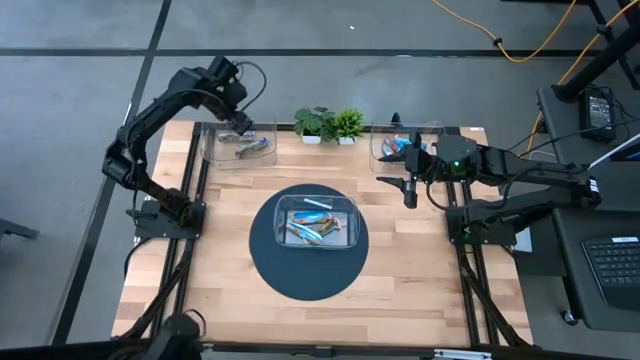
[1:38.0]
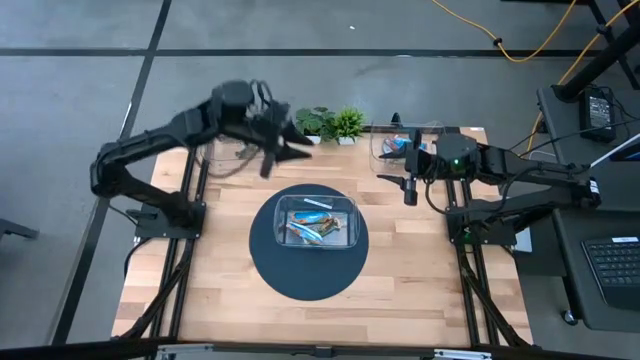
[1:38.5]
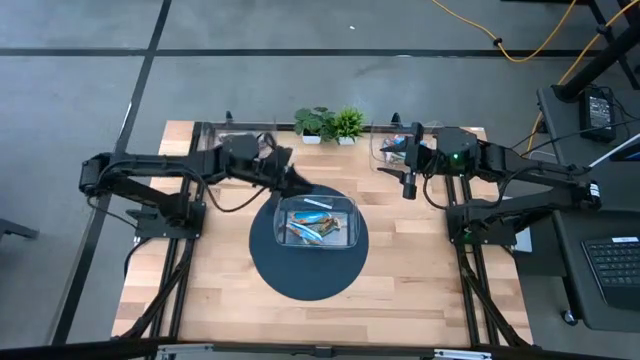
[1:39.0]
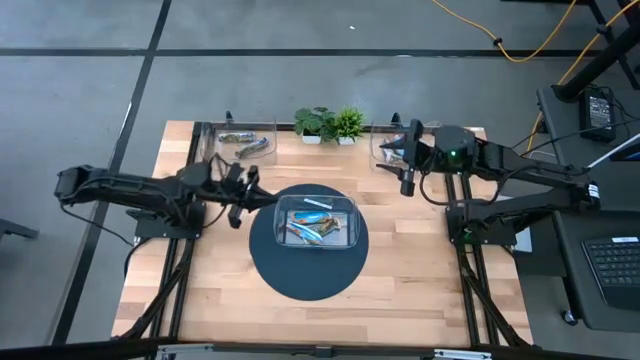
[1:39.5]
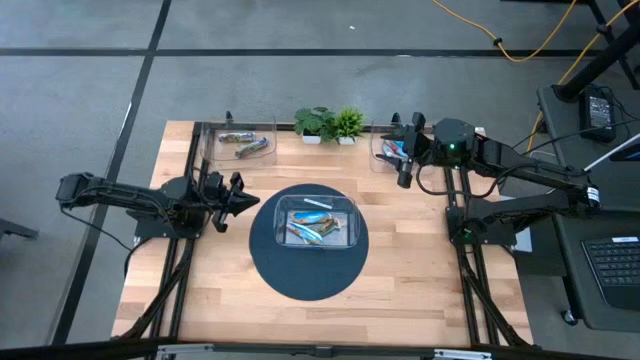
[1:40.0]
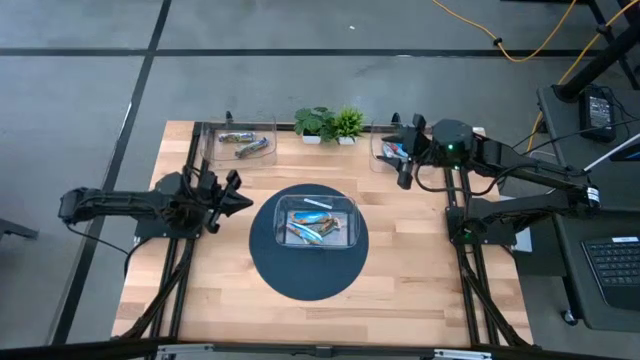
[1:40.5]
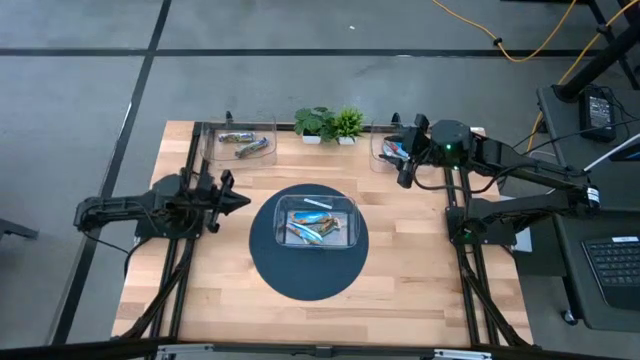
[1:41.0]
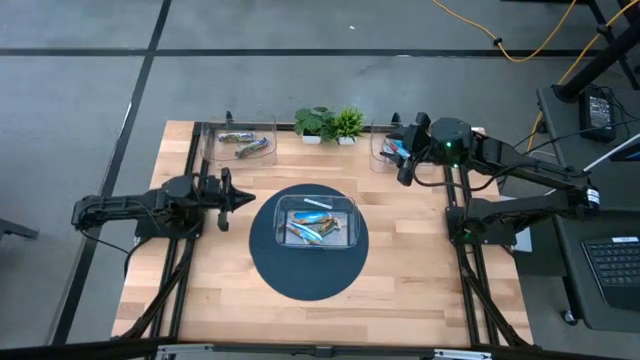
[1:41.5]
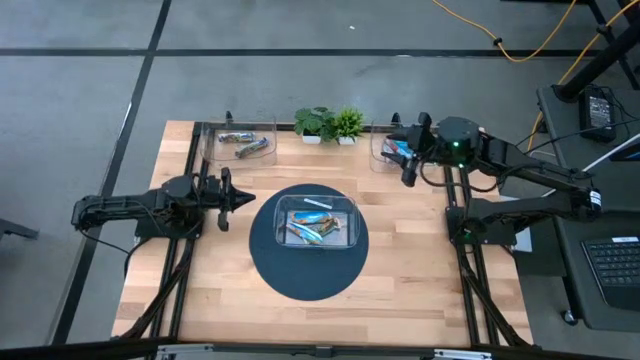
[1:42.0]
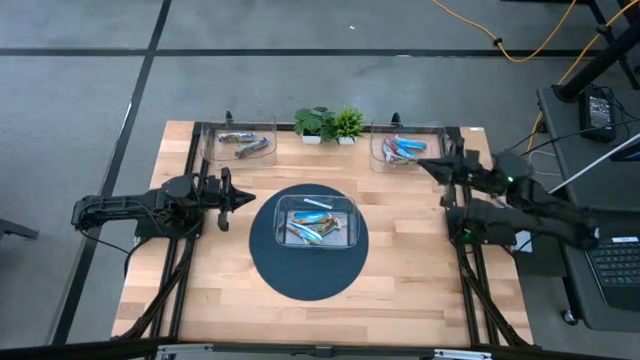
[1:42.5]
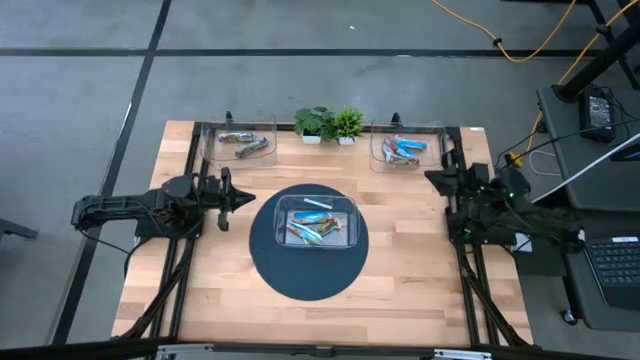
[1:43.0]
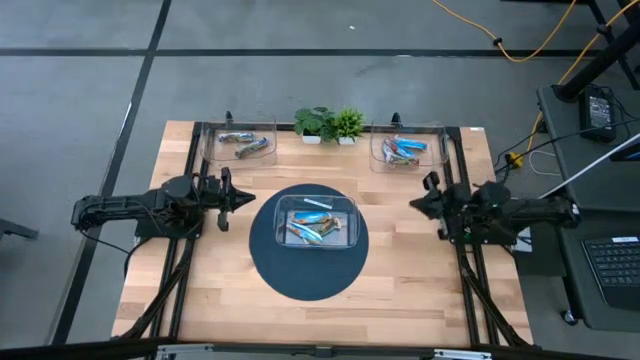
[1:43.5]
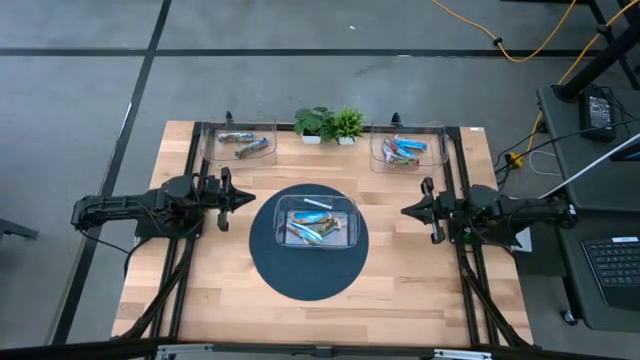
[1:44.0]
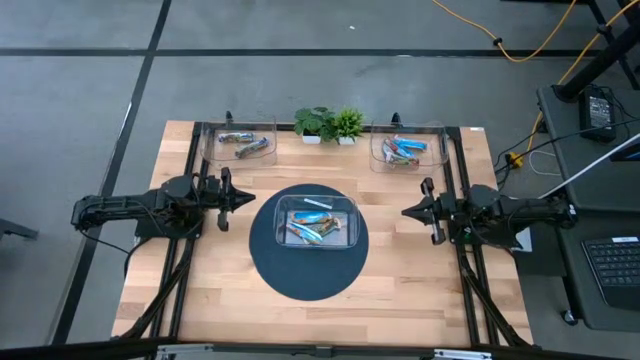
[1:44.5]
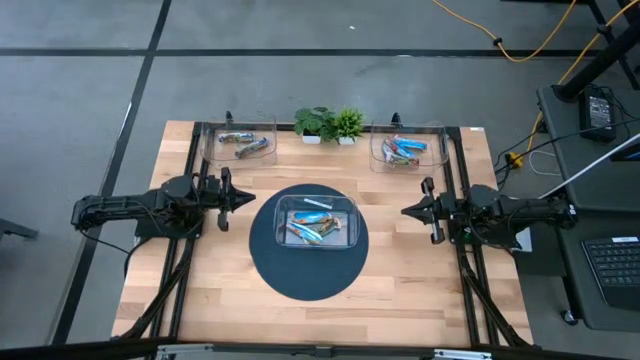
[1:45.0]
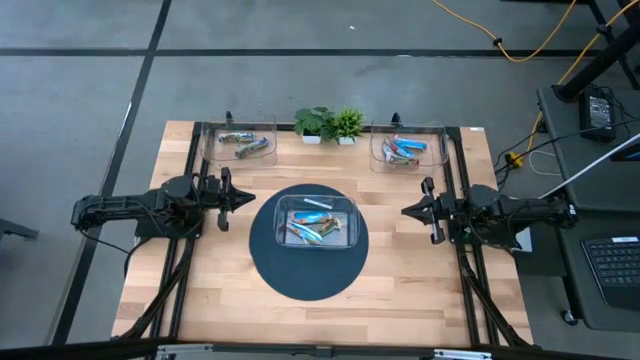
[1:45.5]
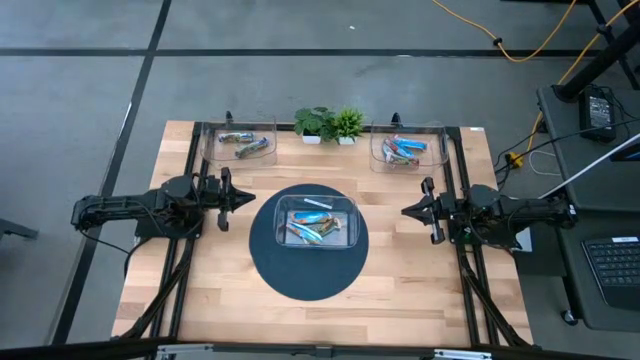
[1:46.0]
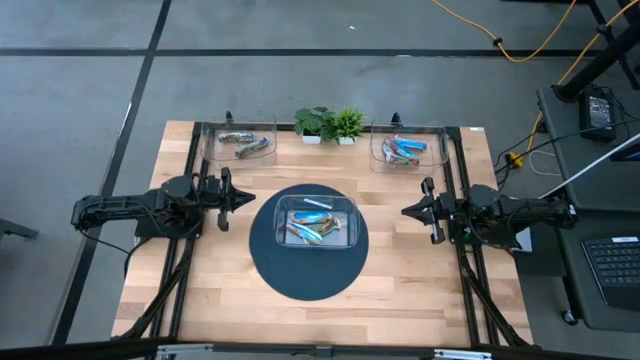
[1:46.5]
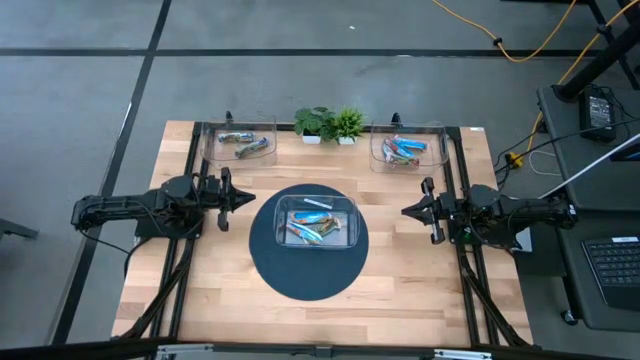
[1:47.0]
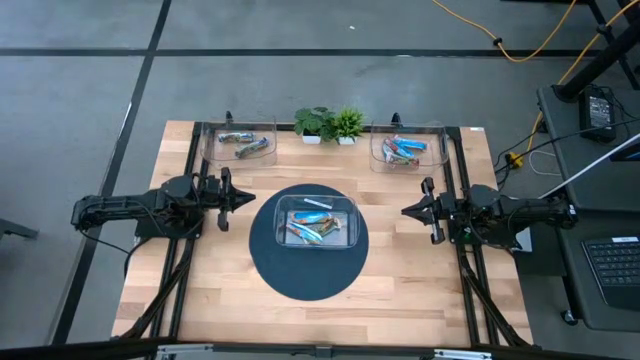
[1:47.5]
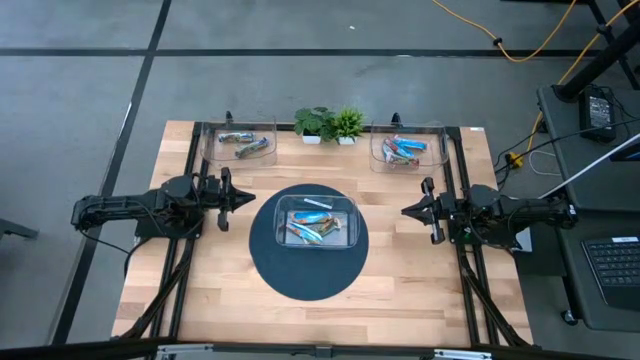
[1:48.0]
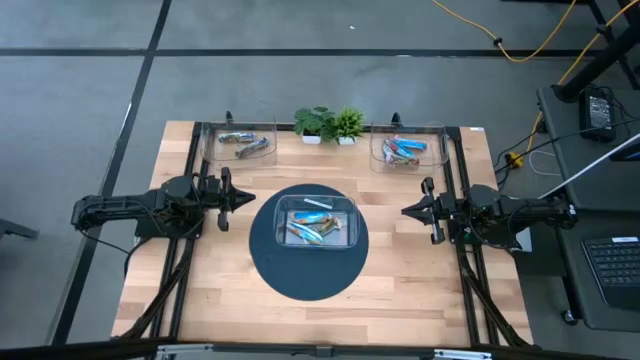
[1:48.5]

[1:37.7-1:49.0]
Task: Pick and place Granola Bars by type
Return to Home Position

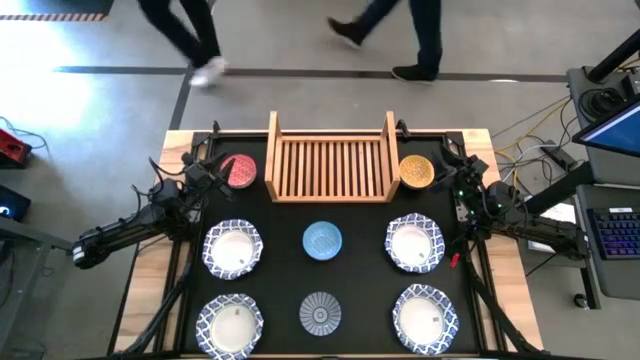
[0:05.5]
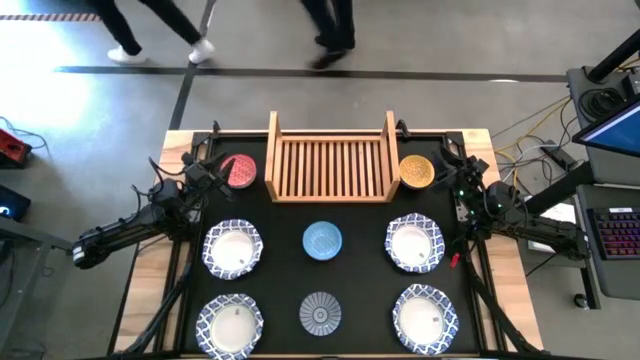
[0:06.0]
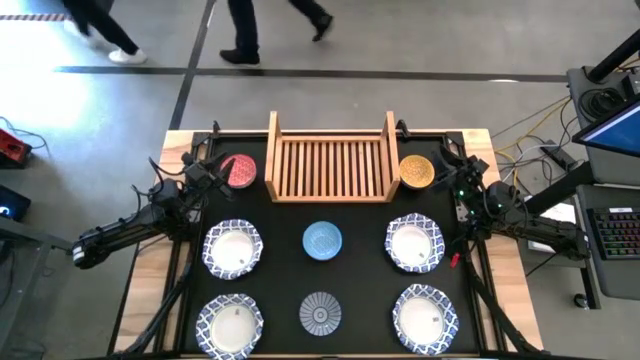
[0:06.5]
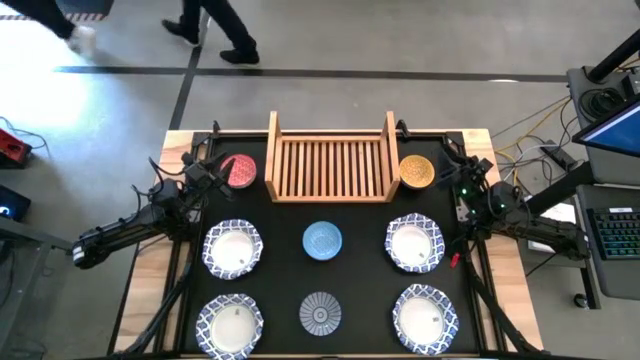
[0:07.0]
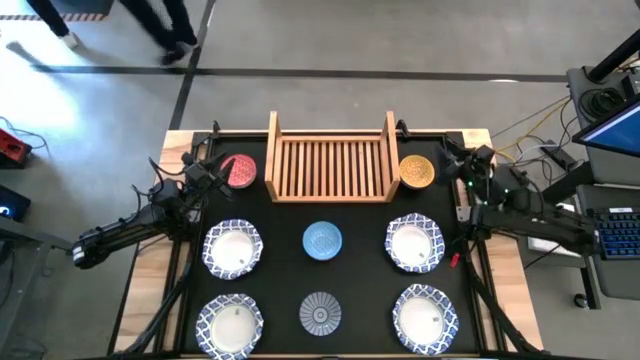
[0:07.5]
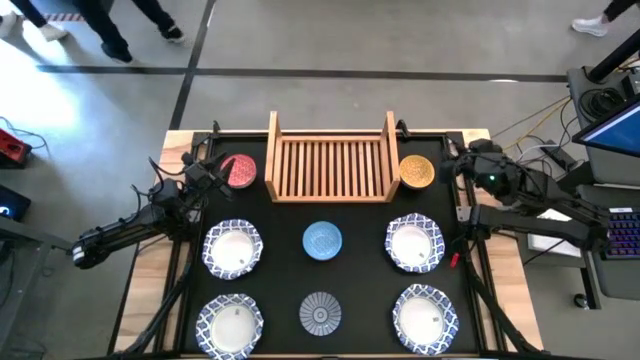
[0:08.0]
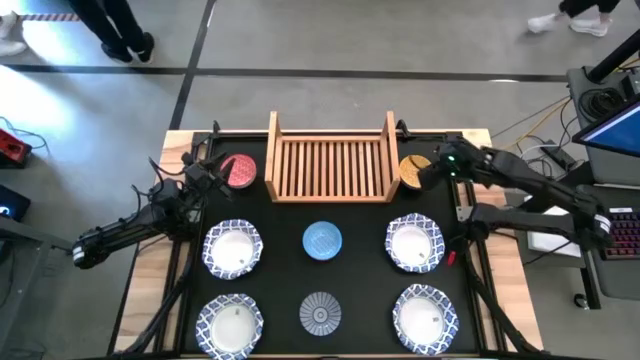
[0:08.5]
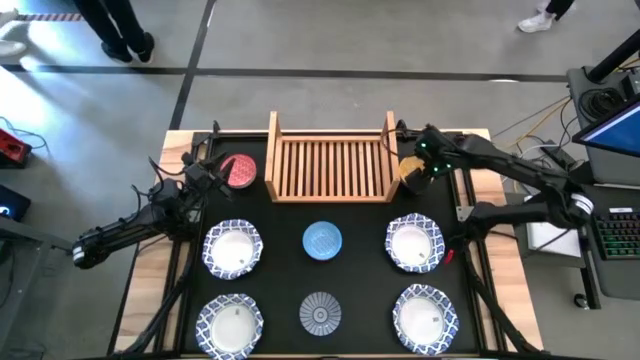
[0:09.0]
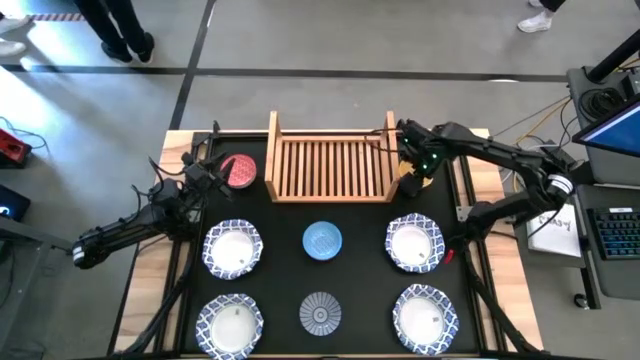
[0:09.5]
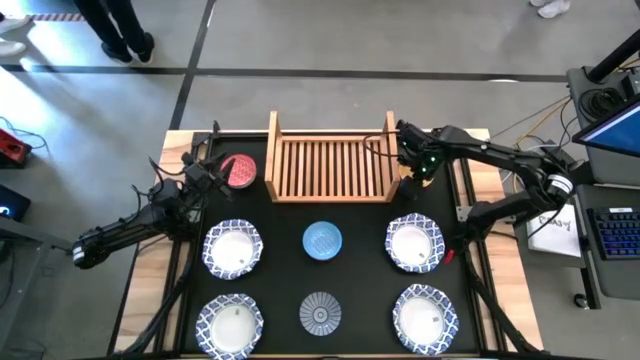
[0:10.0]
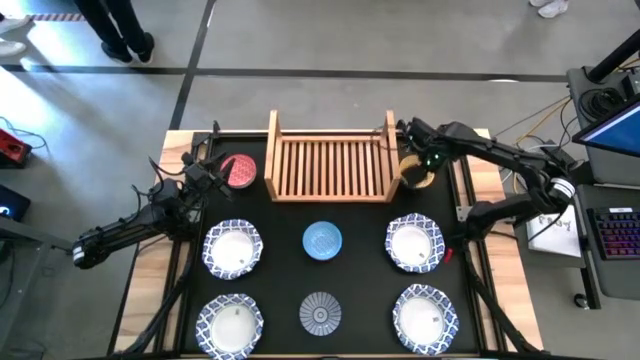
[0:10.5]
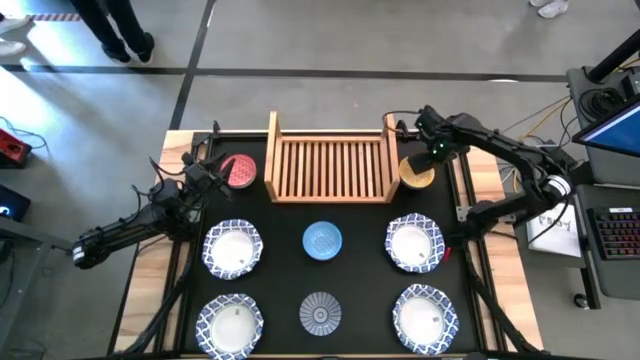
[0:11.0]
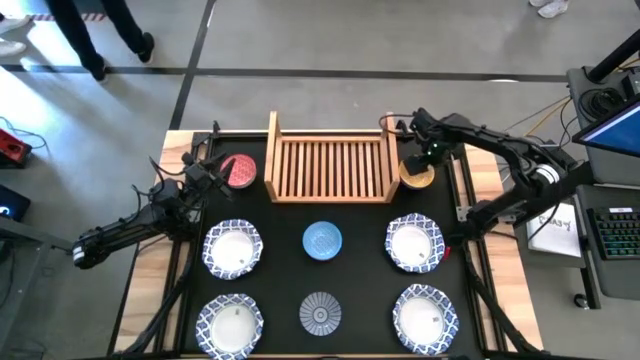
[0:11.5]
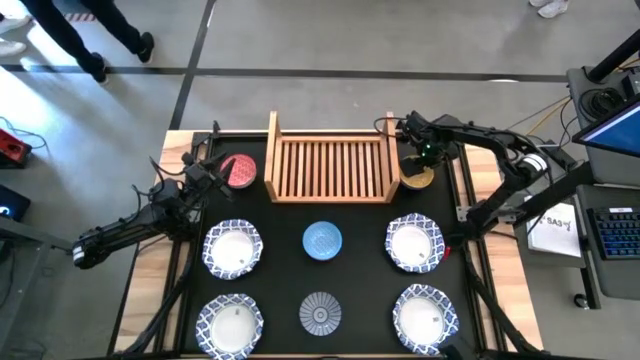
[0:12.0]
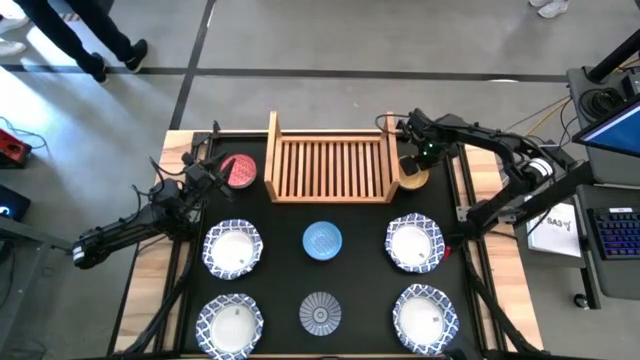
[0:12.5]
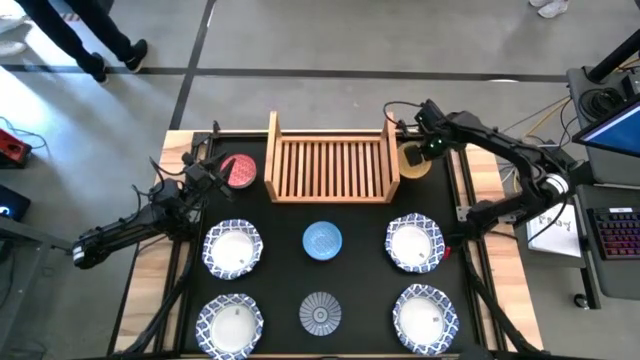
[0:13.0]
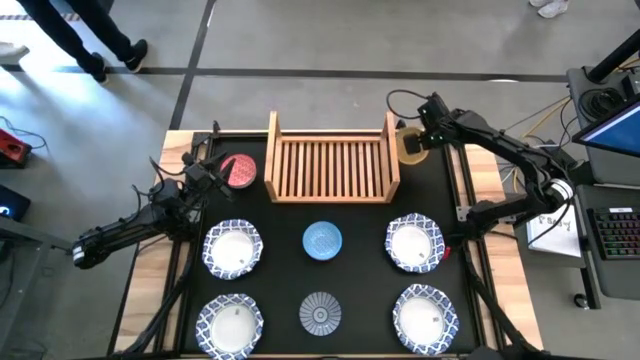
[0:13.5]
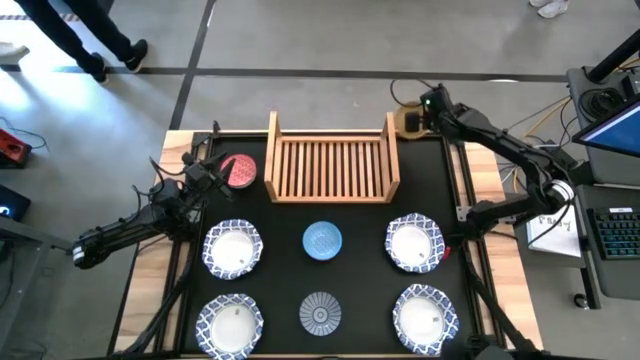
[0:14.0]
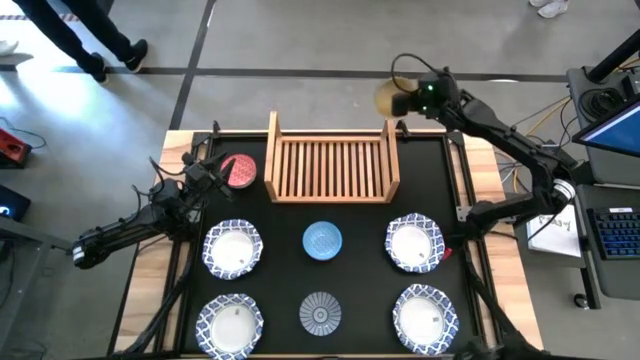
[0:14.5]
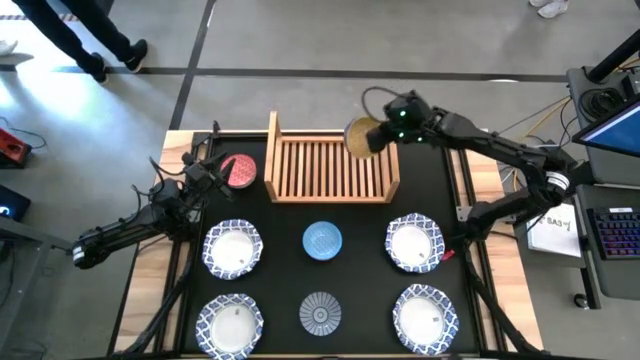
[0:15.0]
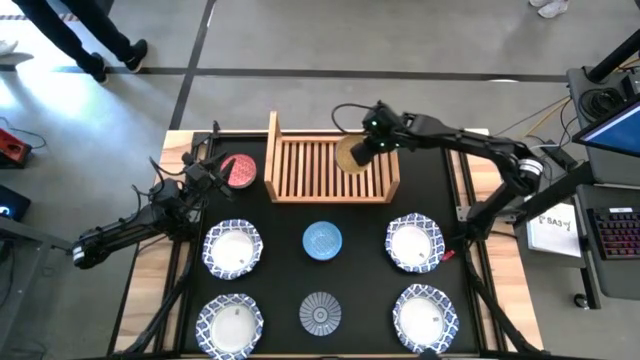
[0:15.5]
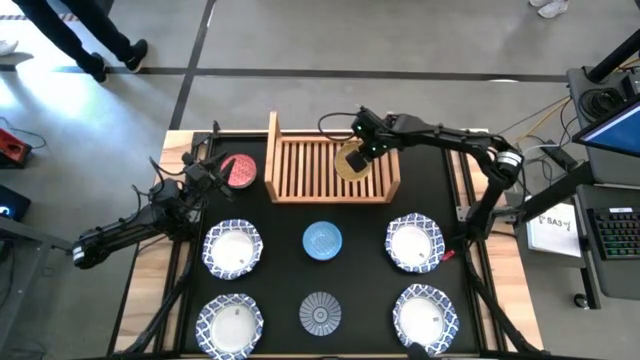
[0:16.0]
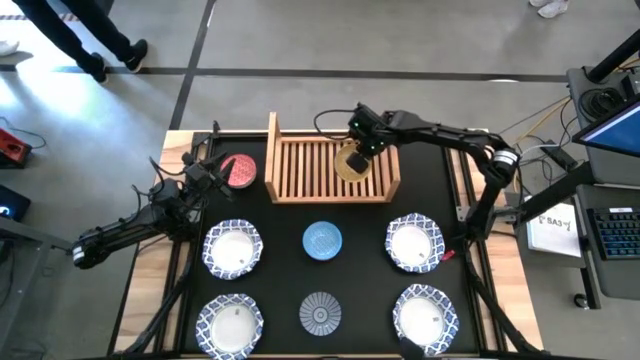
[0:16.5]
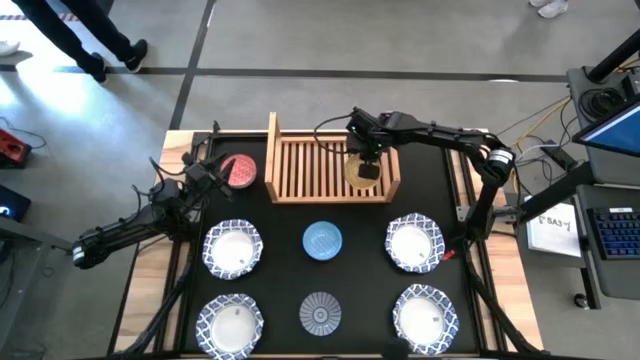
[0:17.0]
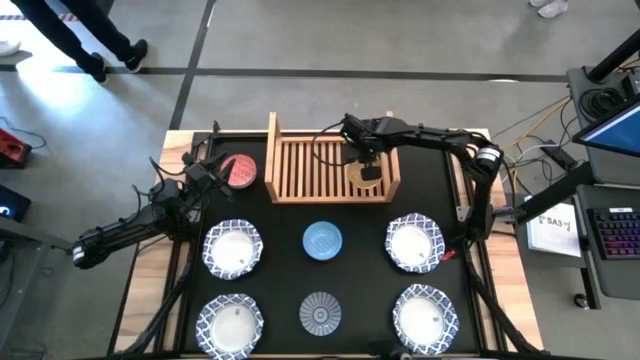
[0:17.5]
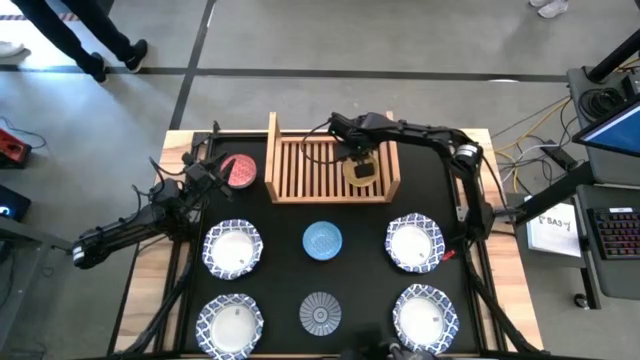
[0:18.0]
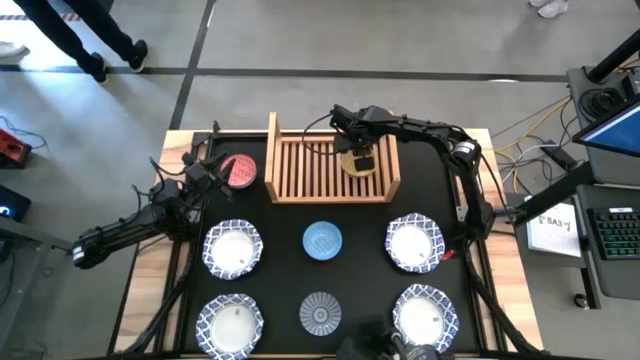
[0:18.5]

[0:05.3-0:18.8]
Task: Place and stack bowls onto a shelf
Put the yellow patterned bowl on the shelf
